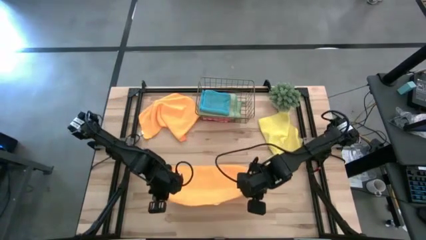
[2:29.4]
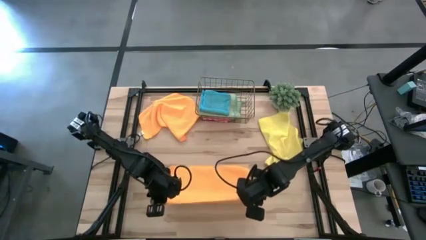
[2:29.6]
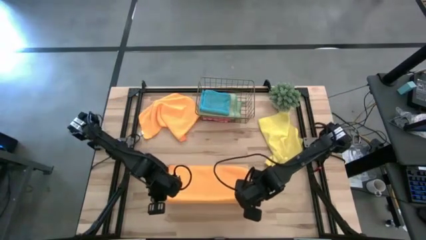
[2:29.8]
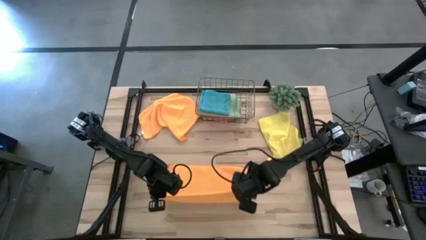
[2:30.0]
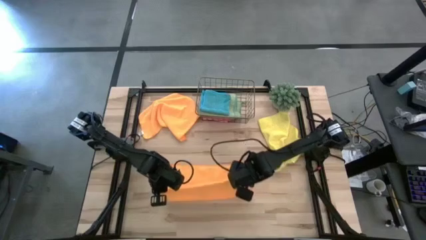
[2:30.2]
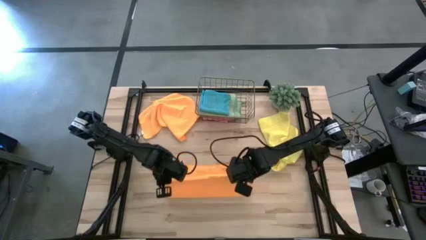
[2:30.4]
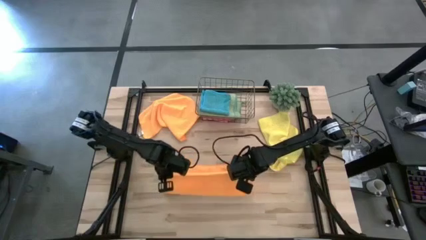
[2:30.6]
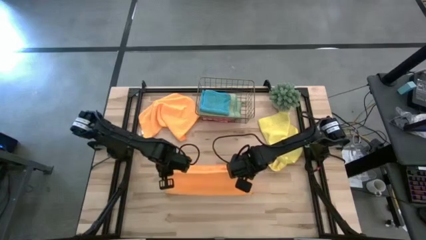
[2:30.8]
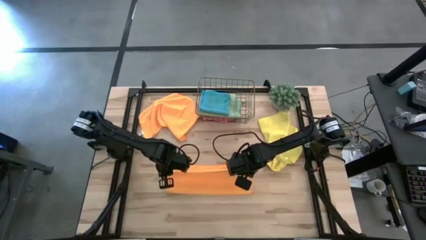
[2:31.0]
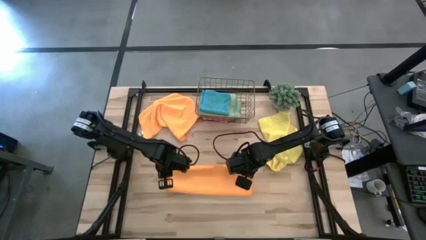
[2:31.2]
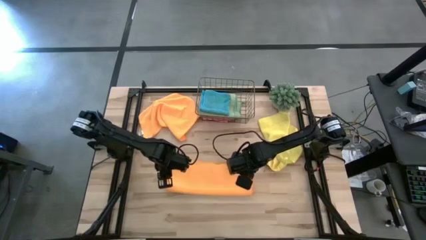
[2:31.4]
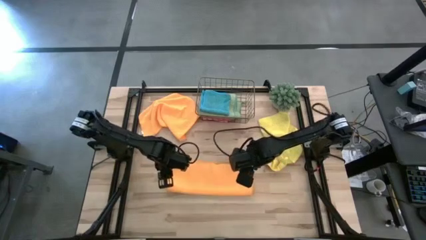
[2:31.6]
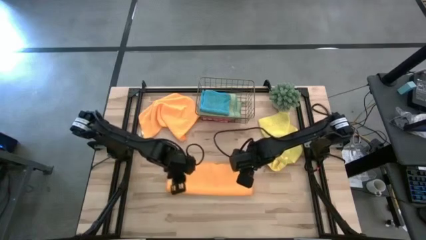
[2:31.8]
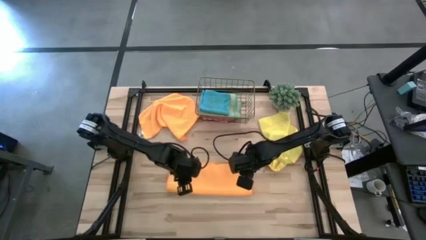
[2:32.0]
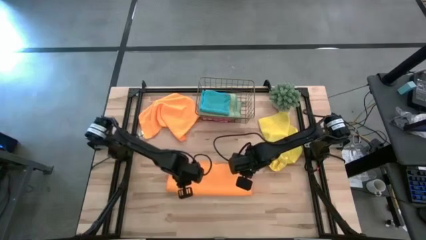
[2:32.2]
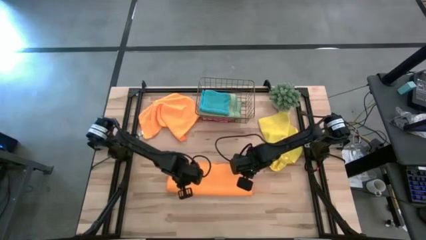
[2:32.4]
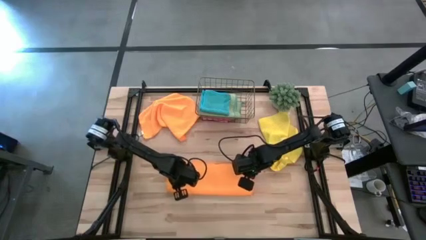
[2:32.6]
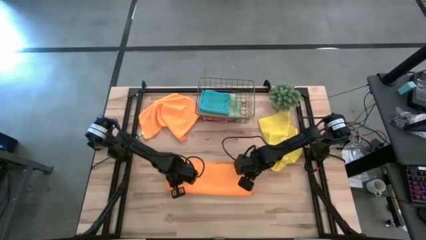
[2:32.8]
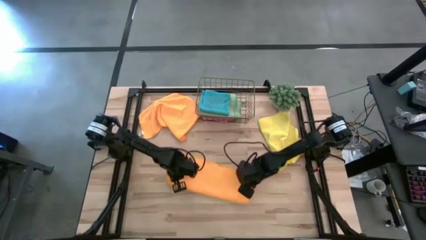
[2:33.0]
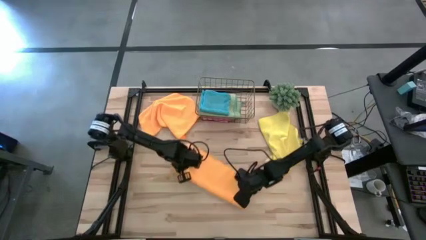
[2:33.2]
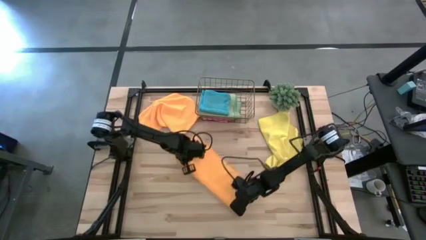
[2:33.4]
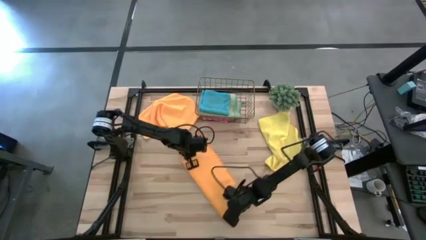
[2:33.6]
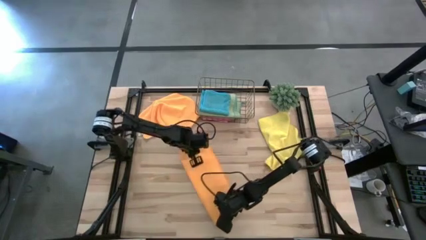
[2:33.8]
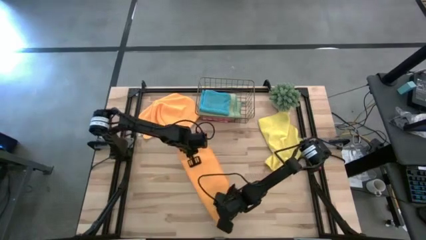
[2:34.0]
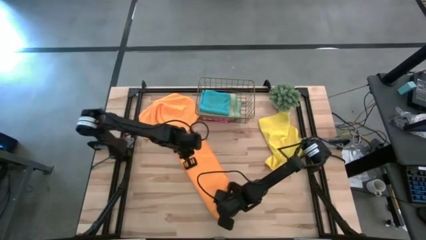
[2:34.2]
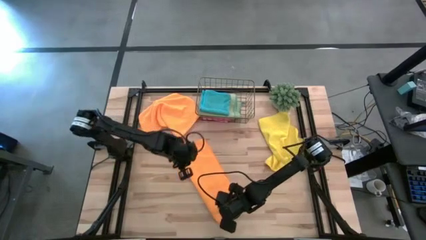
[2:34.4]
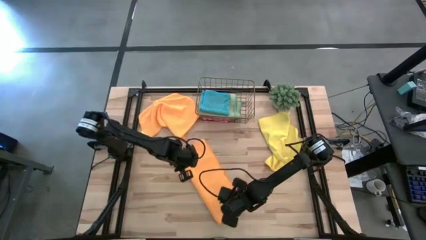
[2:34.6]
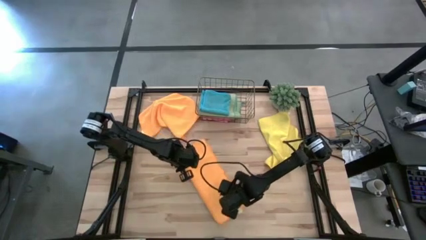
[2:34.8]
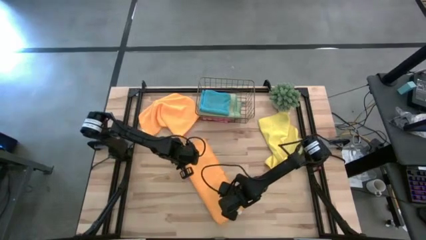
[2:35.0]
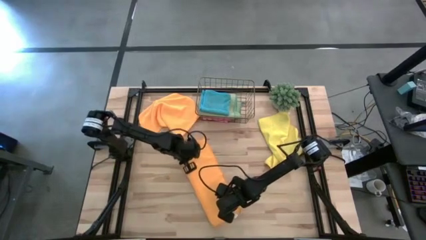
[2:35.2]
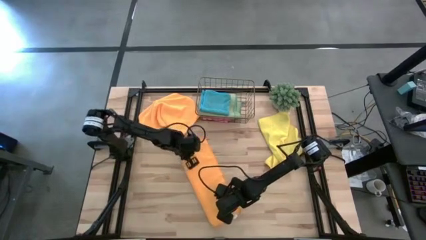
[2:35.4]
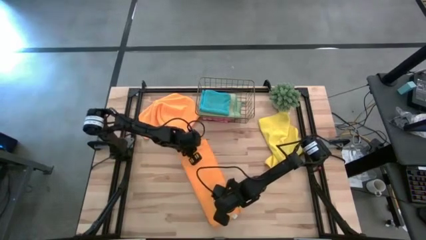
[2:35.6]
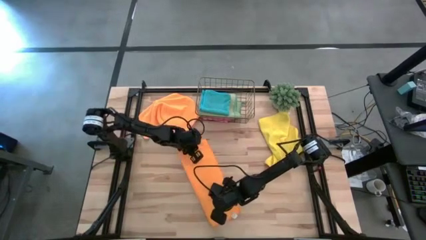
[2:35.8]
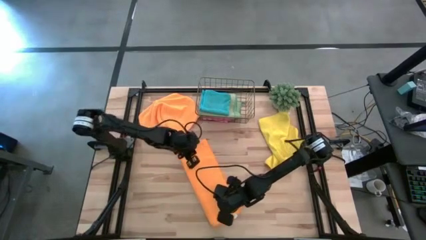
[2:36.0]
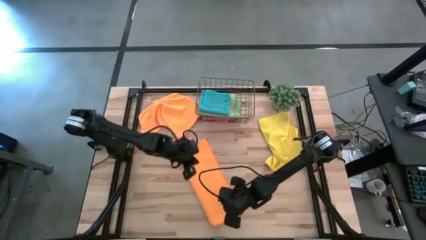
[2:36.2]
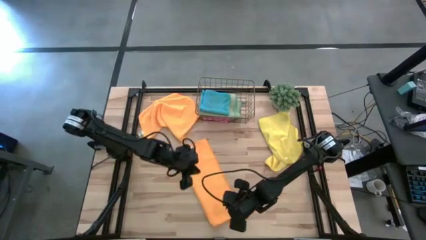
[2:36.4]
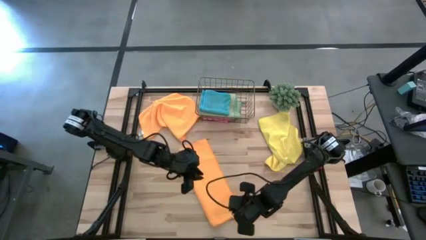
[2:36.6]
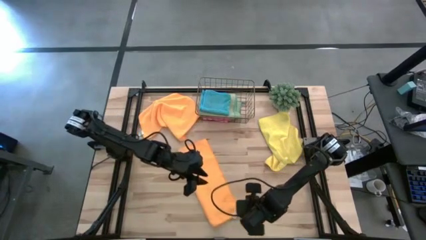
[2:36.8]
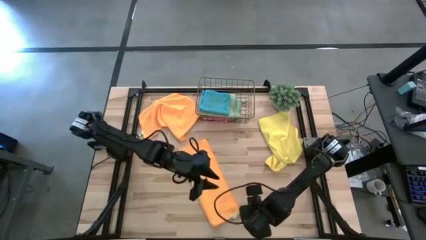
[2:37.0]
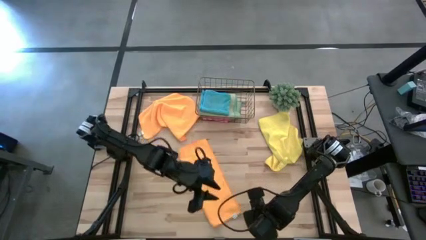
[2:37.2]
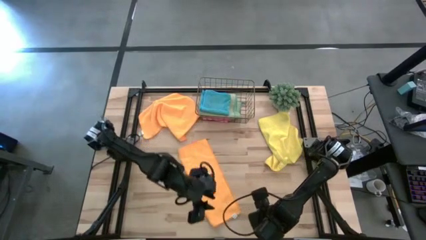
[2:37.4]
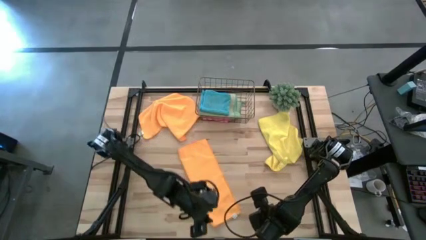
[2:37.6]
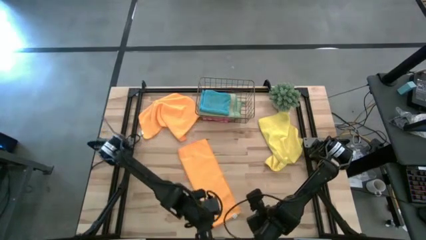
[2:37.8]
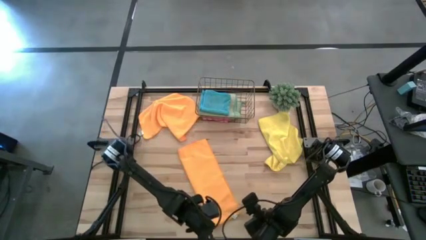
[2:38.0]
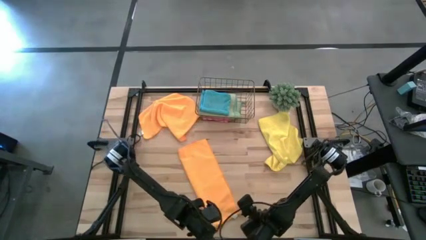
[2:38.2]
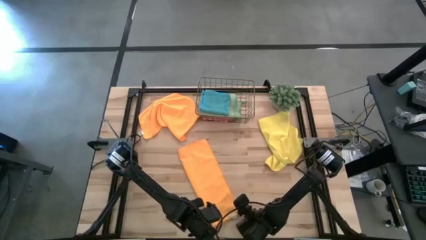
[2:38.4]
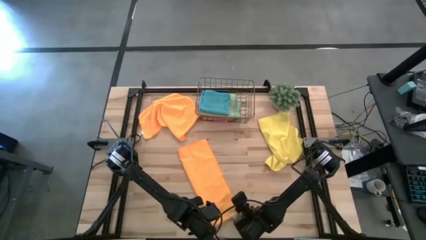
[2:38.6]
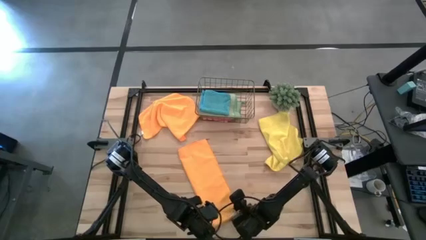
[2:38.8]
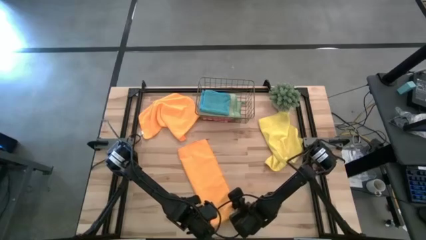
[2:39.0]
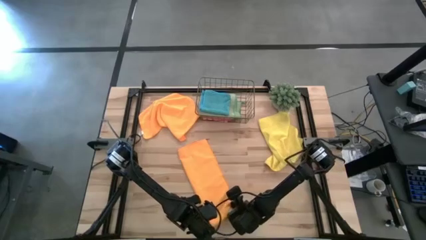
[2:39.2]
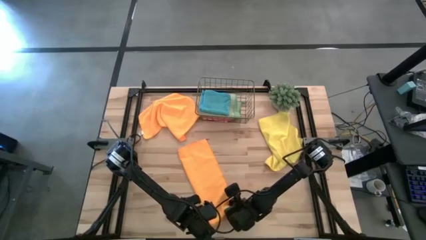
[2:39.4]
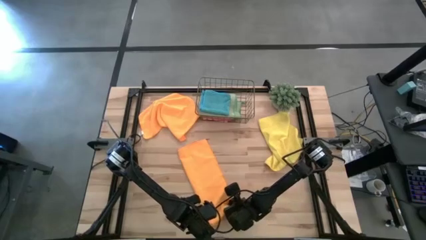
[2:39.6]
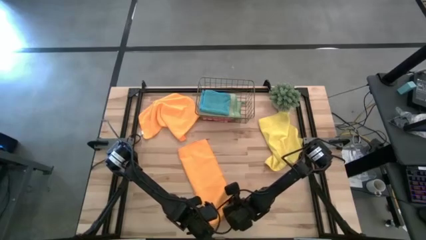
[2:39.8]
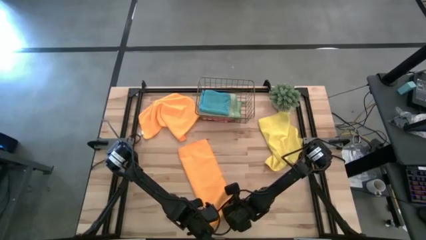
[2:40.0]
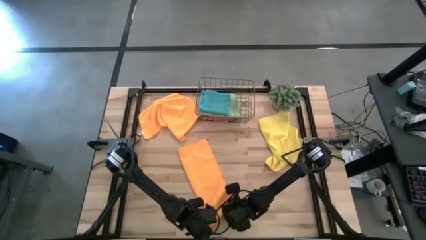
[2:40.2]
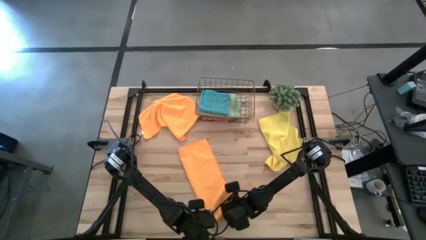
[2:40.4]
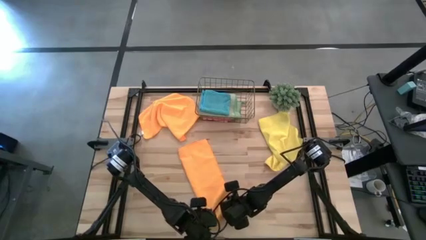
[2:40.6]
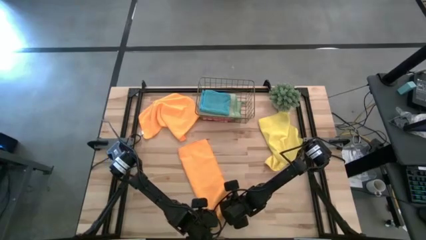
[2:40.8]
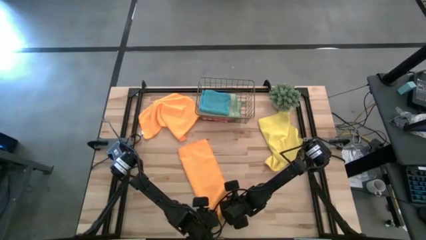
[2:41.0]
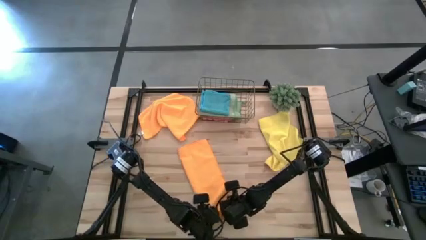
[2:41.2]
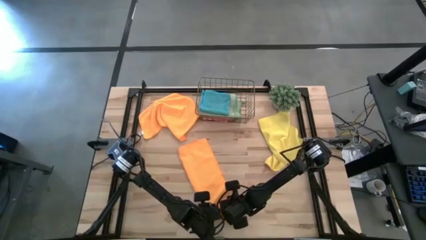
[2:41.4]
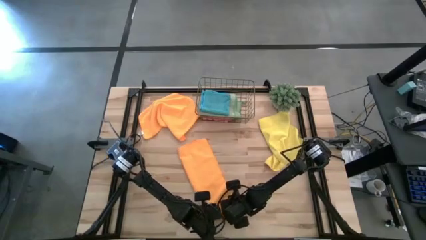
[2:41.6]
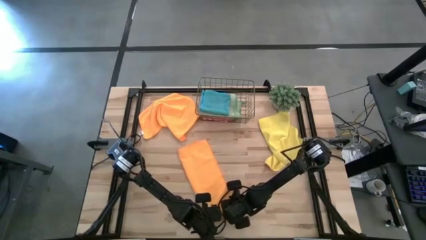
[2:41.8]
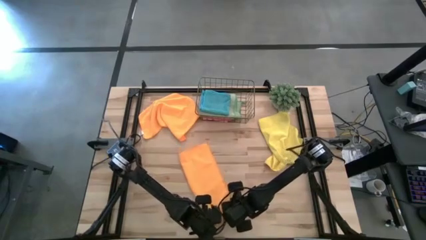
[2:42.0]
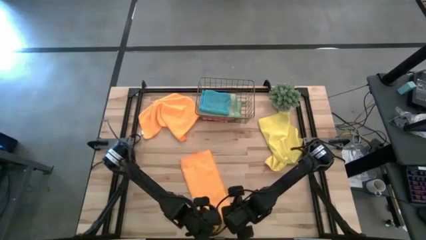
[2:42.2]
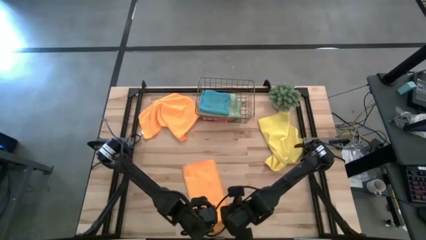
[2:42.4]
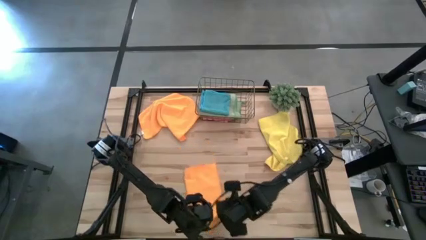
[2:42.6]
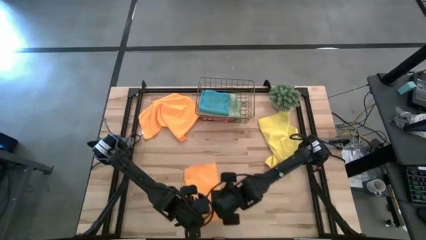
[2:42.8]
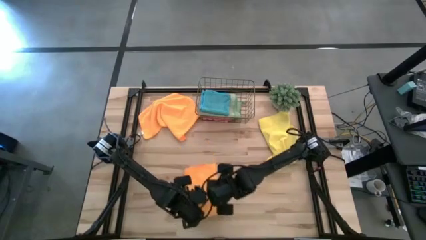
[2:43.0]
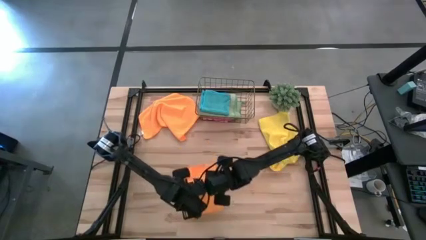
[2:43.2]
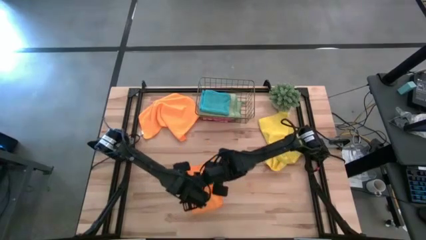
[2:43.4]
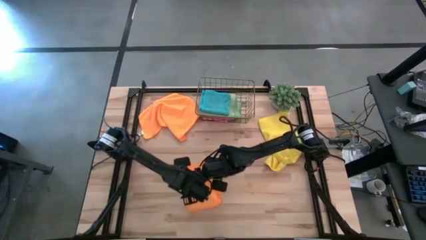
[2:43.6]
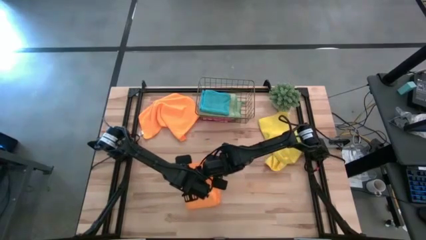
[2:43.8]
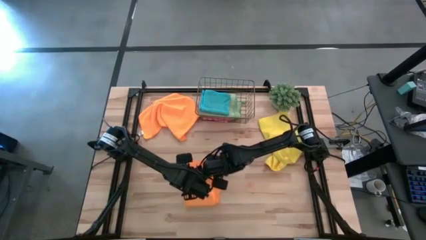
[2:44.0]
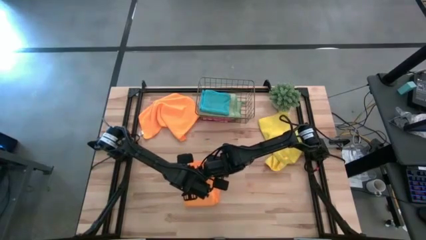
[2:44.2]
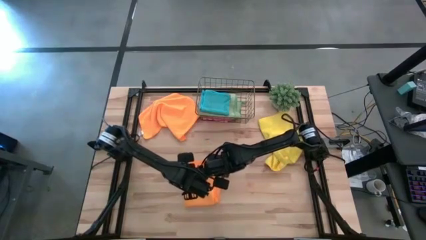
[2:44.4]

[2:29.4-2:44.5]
Task: Fold microfiber towels
Fold the bottom orange microfiber cloth

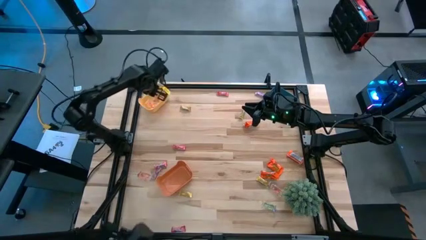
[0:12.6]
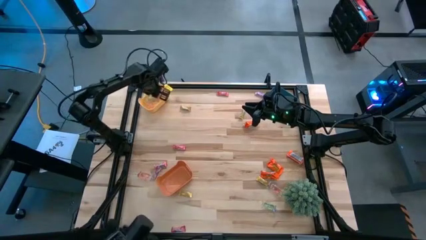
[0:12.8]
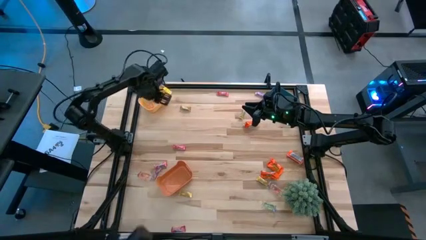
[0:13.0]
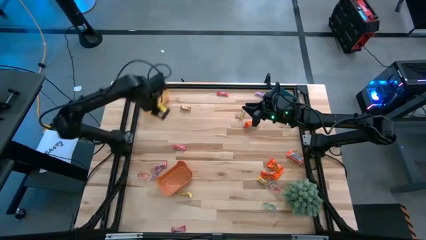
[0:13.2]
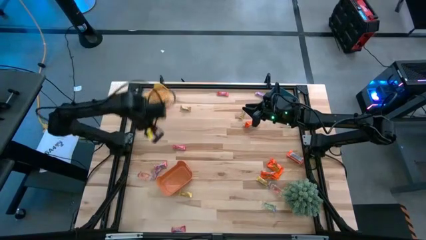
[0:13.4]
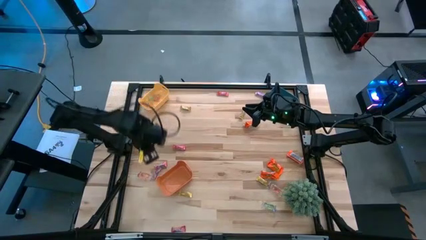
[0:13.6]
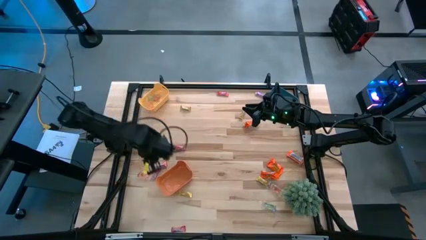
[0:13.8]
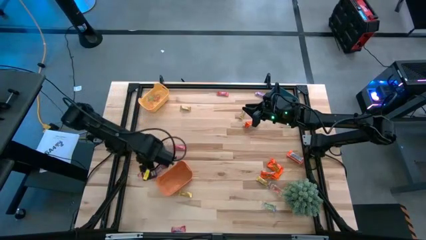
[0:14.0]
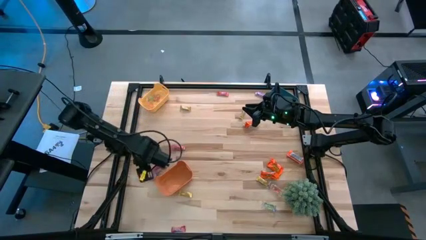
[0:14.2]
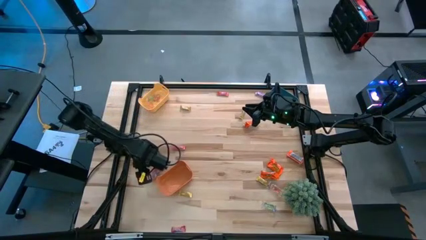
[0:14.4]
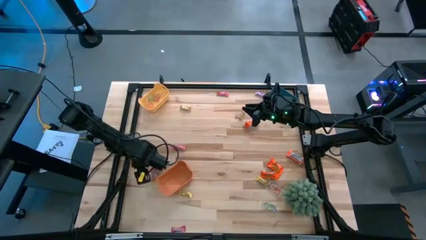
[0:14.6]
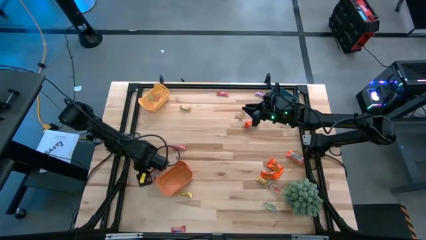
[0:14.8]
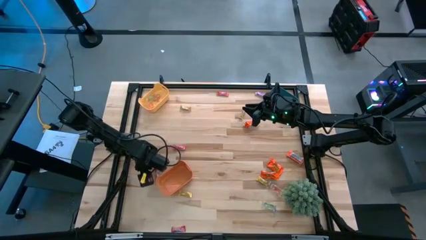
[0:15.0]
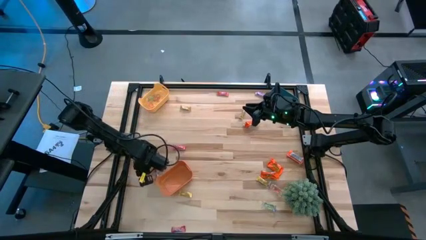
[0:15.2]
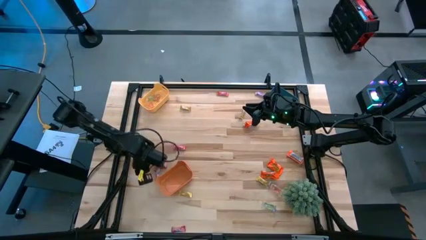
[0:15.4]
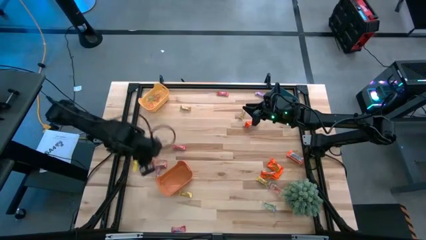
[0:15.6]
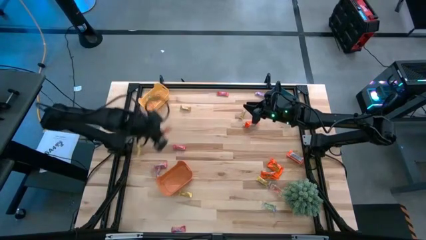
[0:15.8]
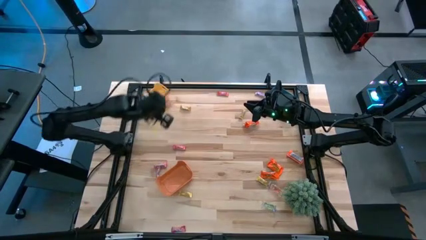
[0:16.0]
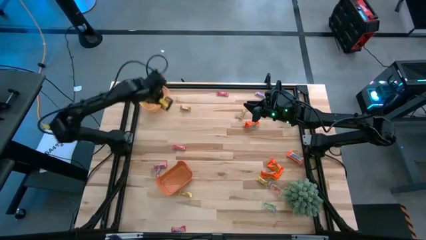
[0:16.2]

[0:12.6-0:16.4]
Task: Sort candy
Put the left orange gummy into the yellow bin
